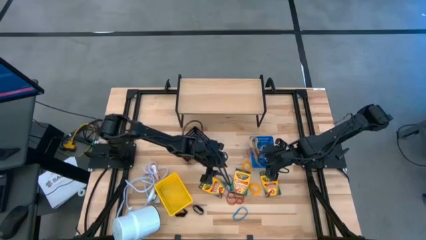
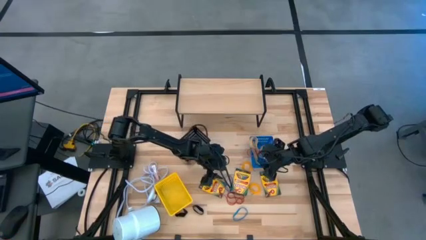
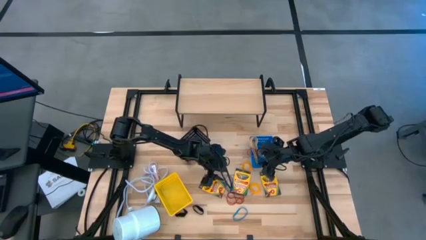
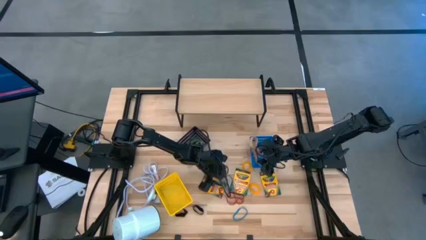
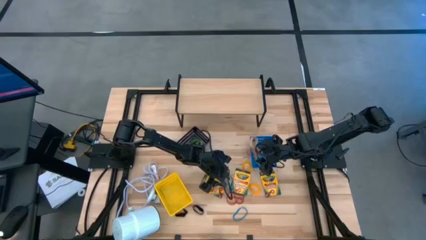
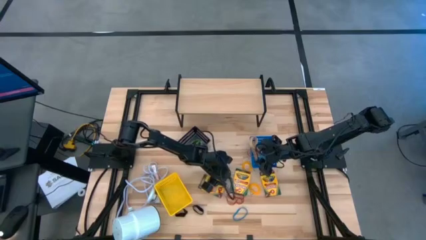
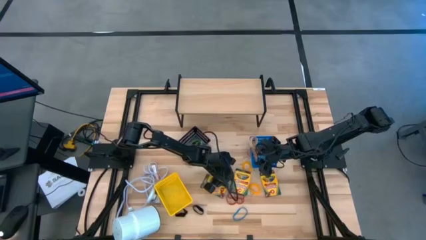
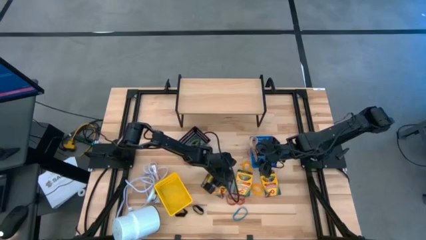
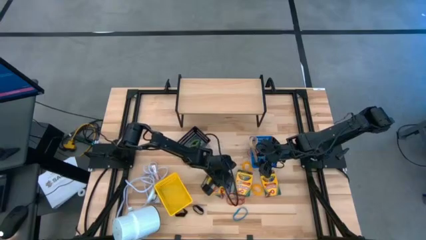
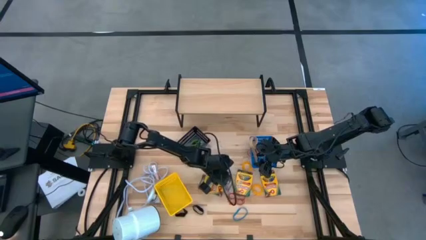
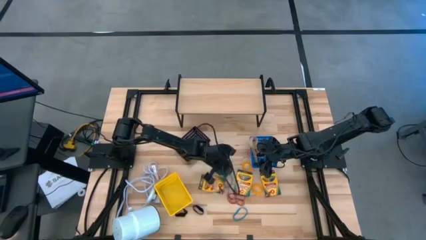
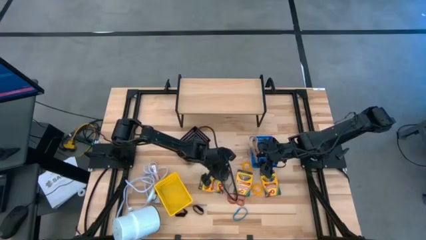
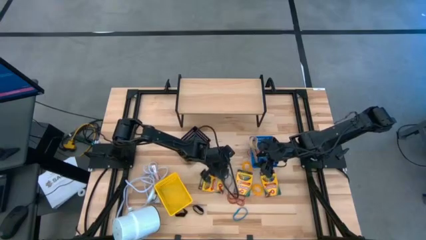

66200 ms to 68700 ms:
Task: Pick & Place Office Desk Supplies
Put the blue rubber band into the blue bin

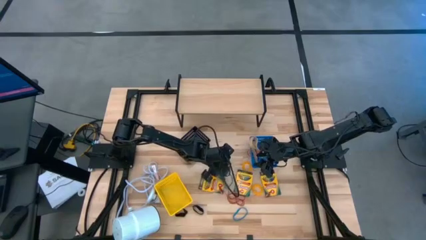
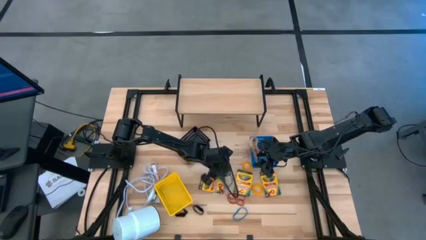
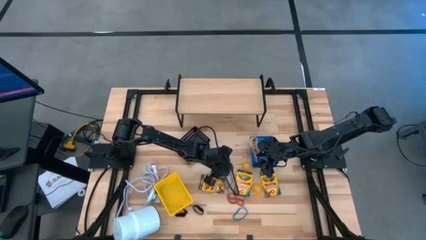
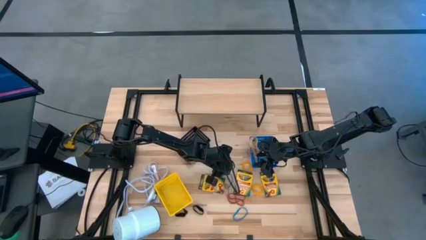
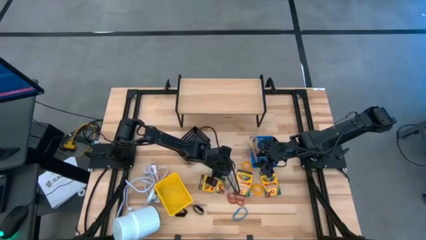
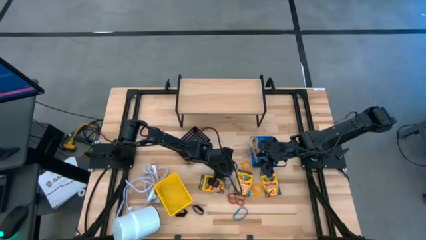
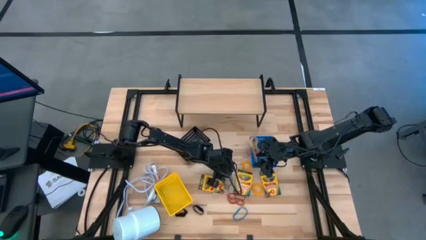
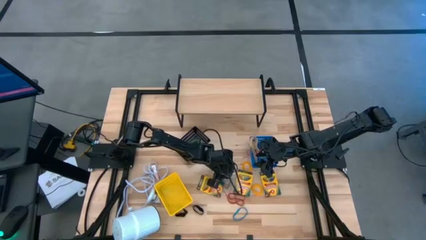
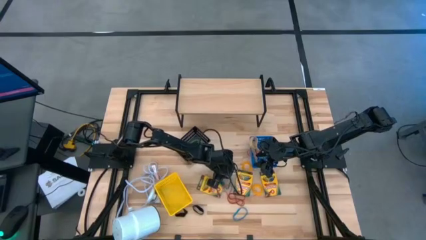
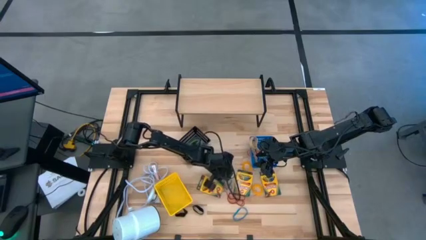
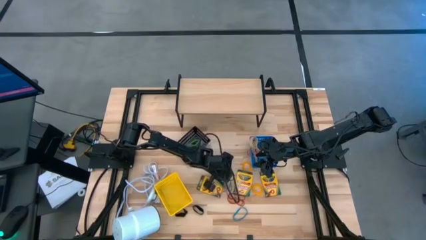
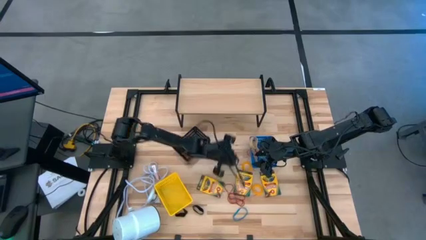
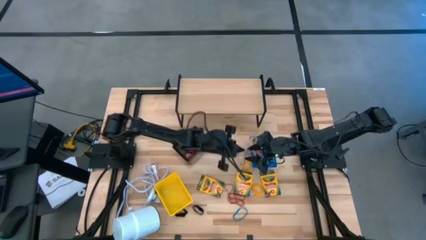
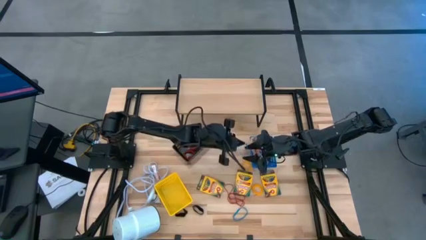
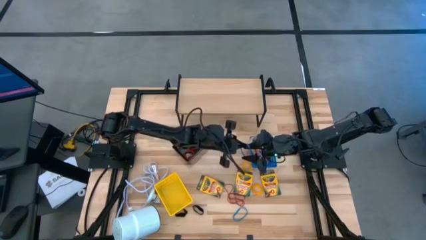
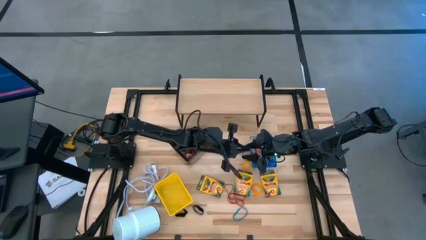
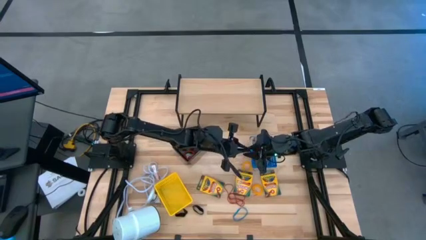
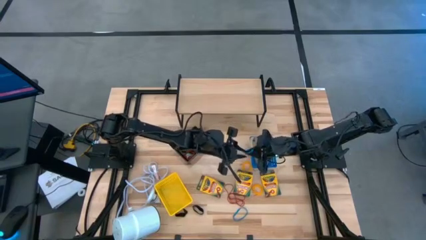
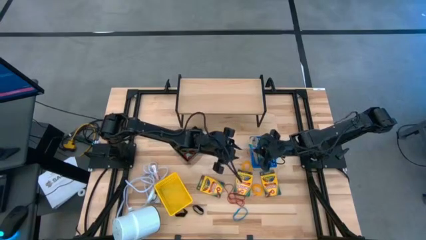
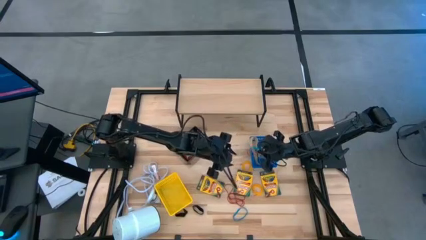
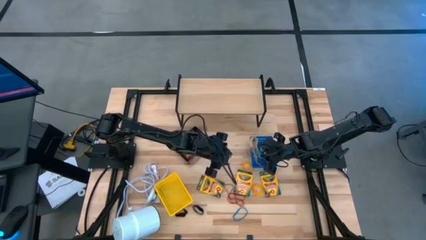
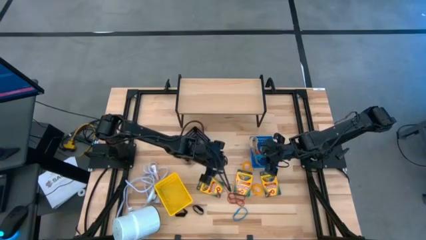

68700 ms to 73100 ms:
Put the blue rubber band into the blue bin

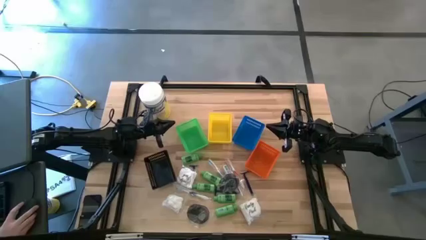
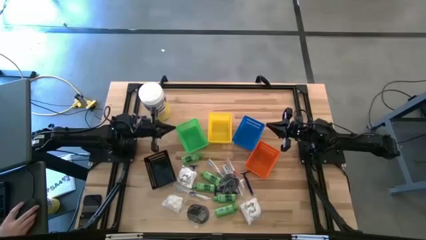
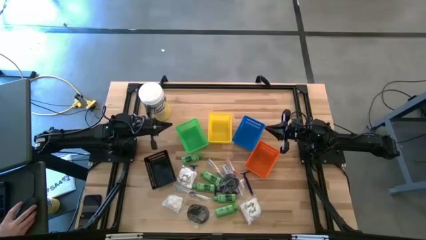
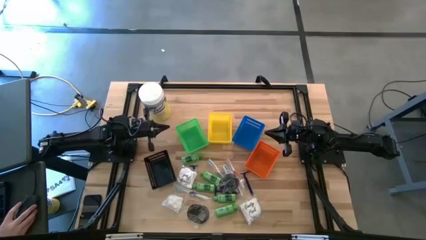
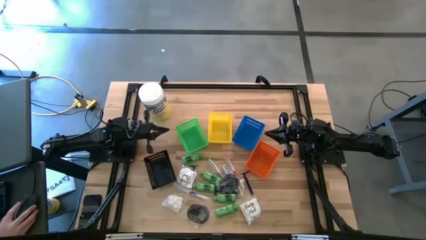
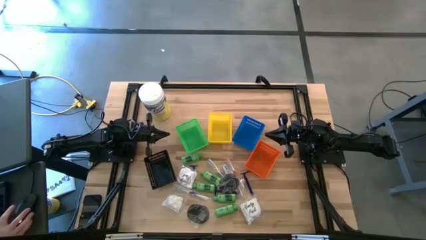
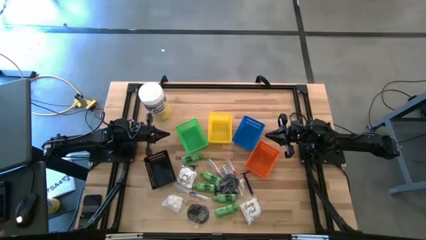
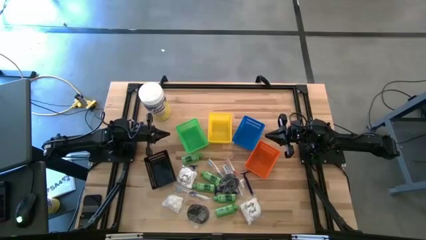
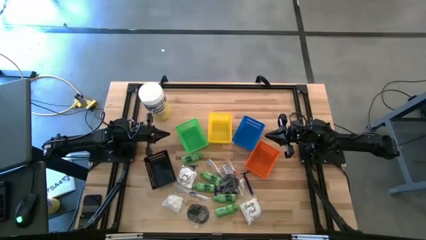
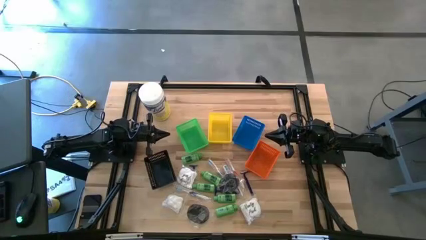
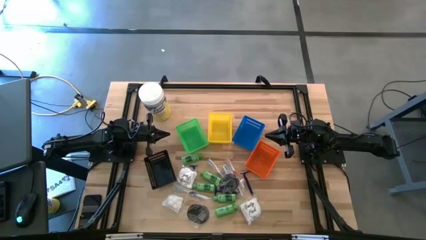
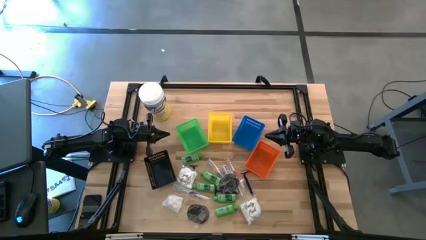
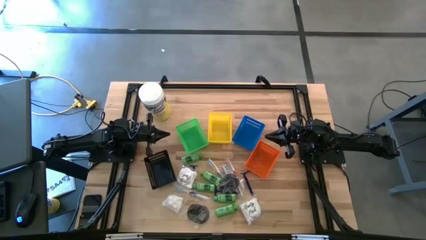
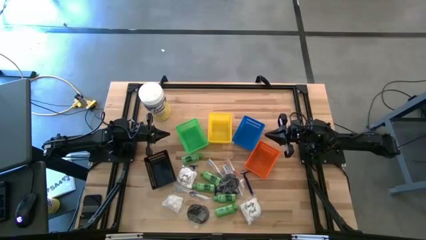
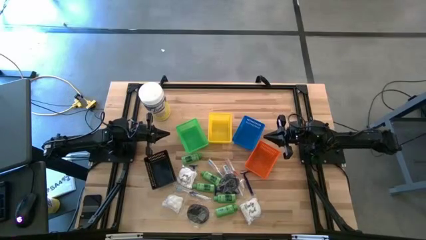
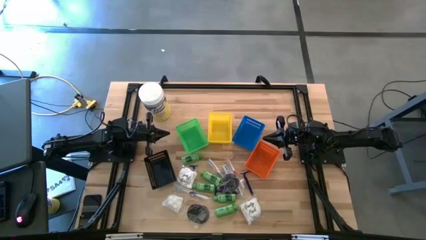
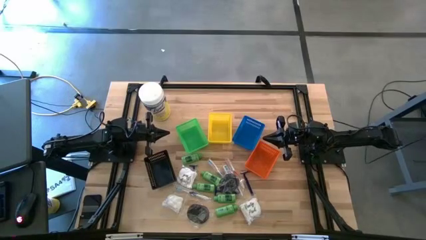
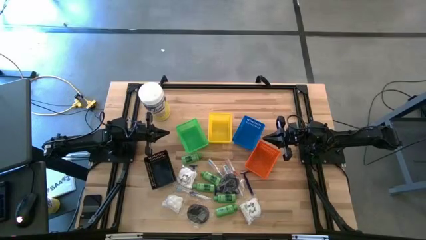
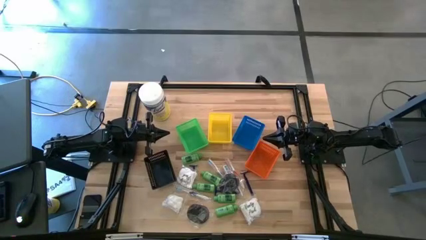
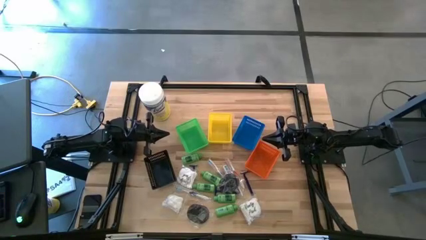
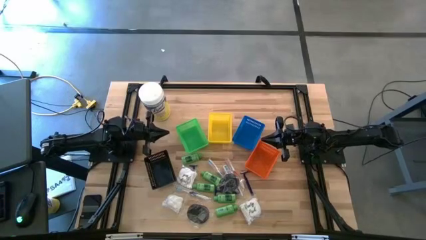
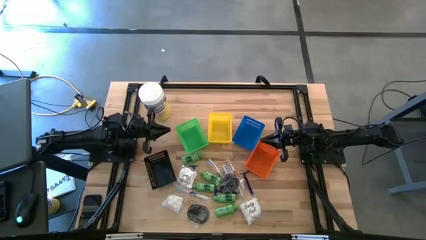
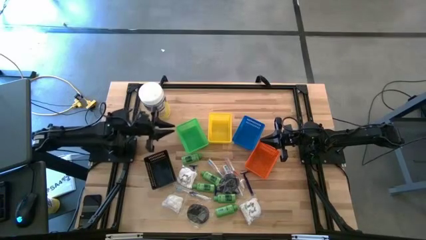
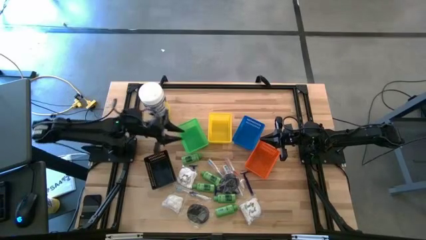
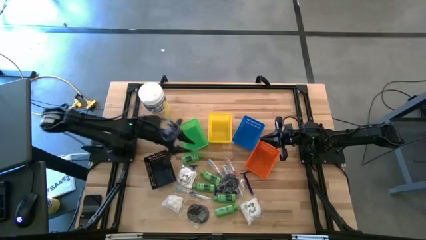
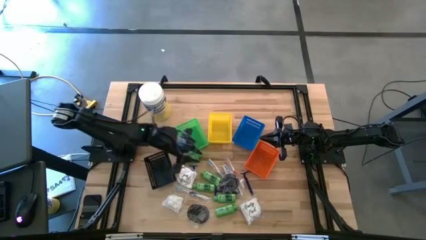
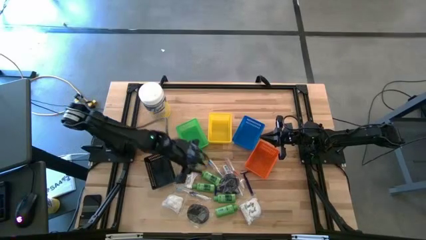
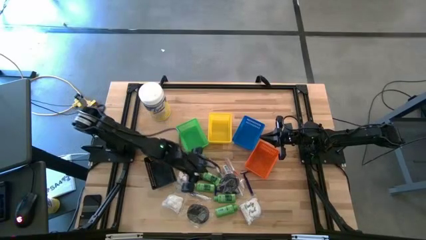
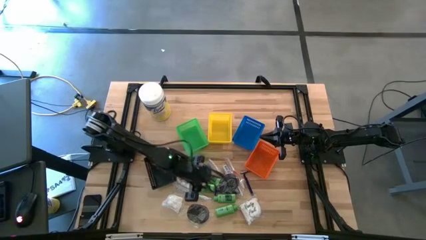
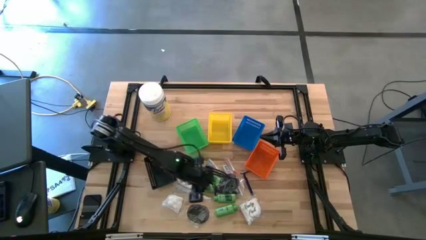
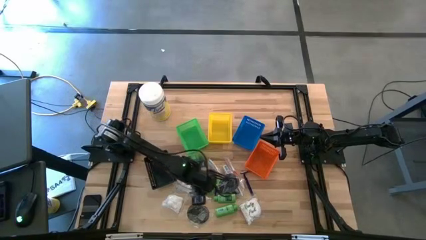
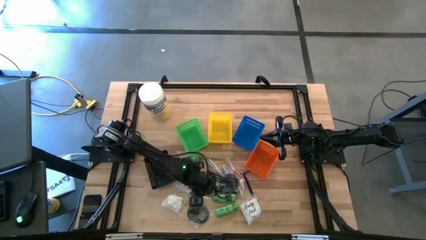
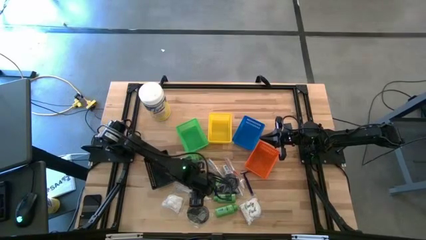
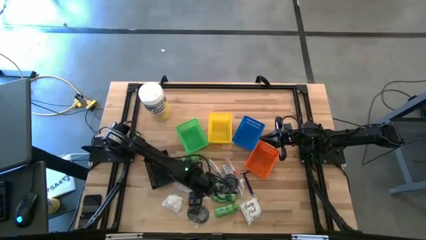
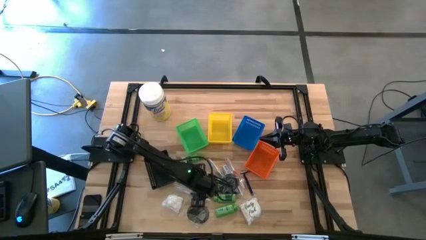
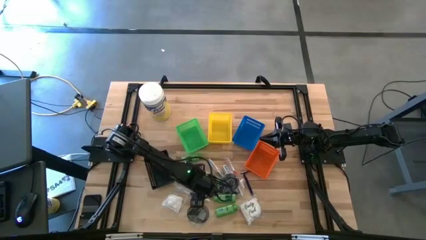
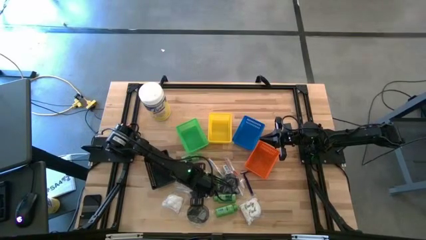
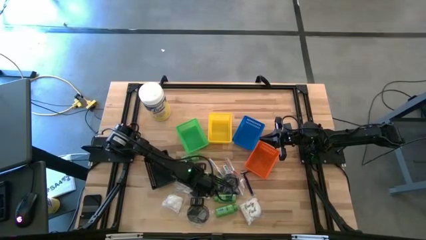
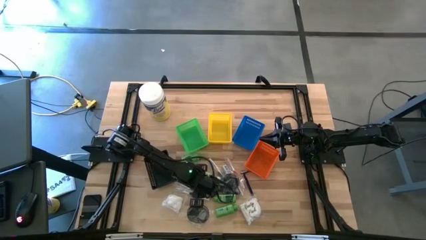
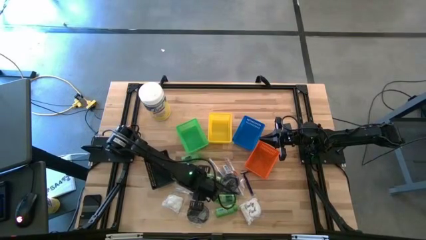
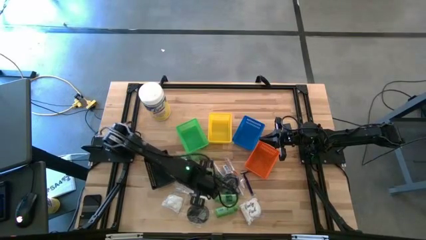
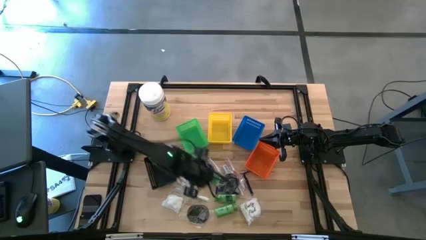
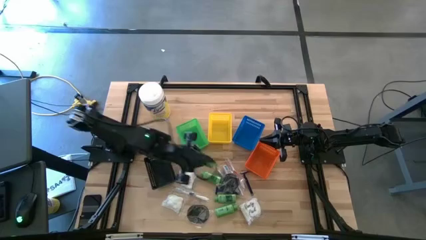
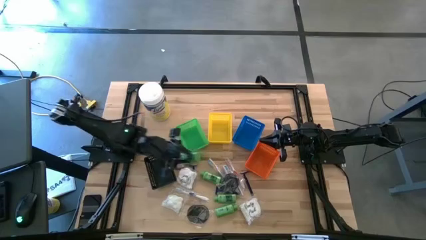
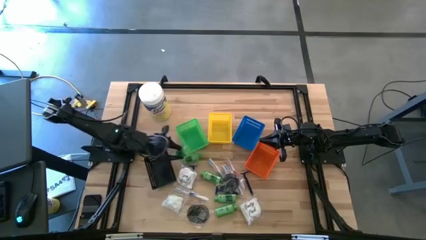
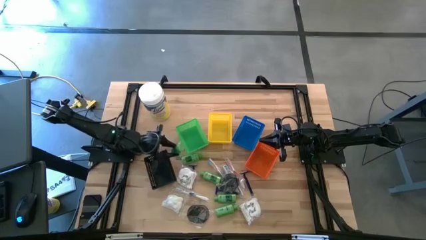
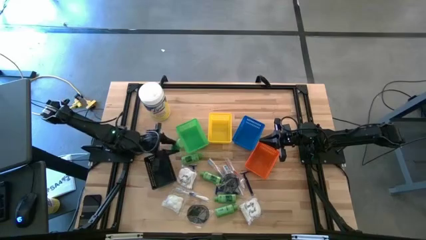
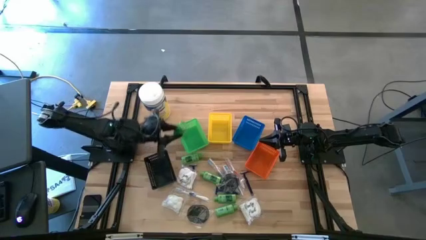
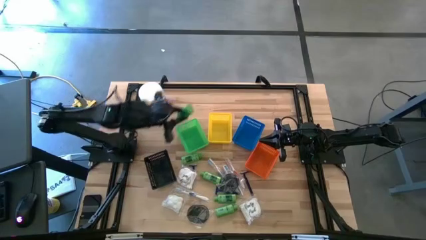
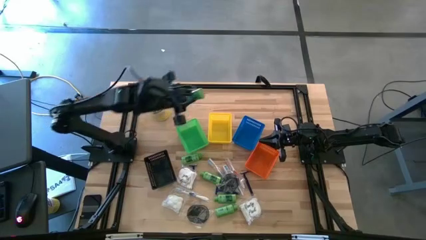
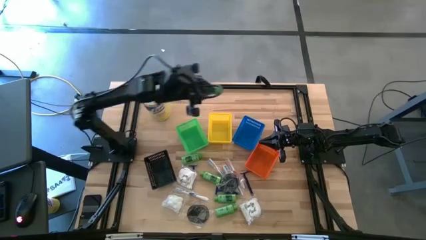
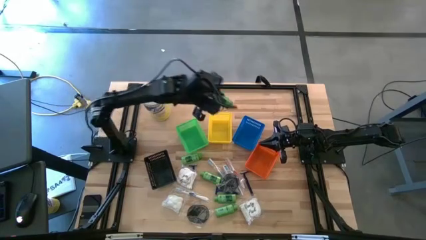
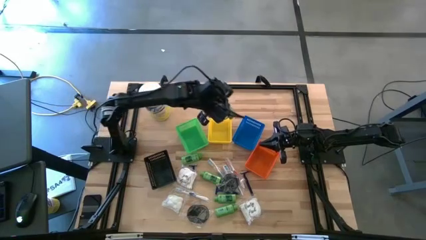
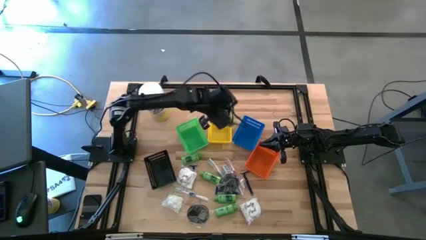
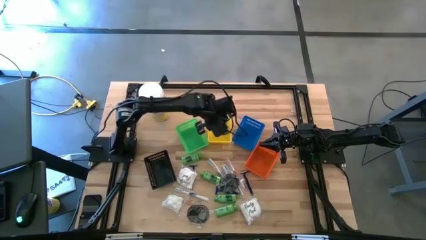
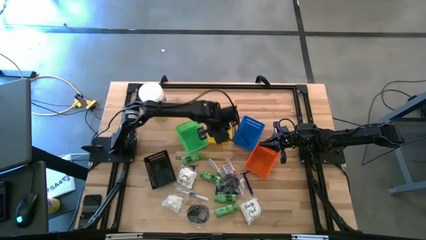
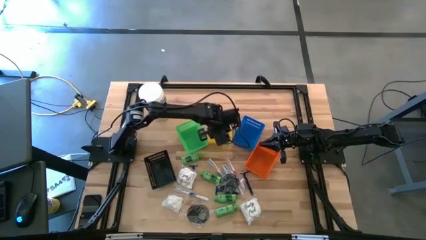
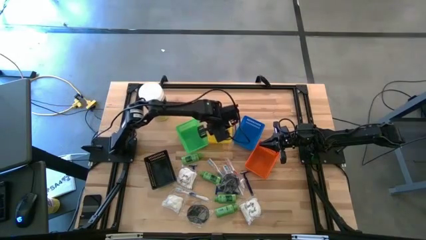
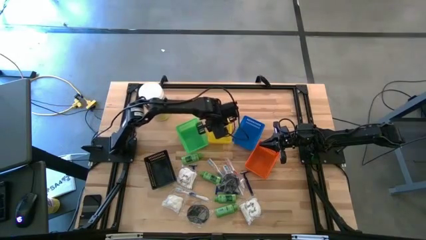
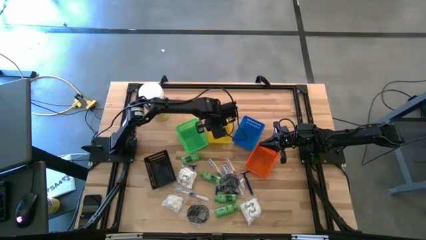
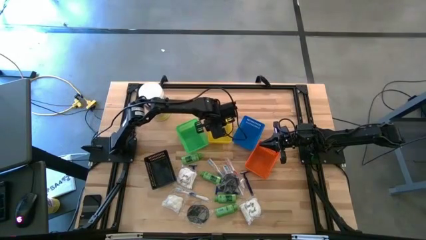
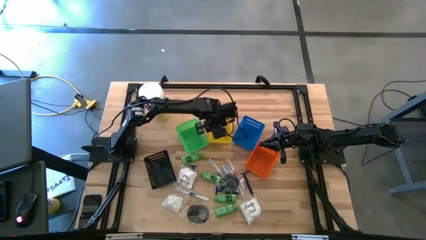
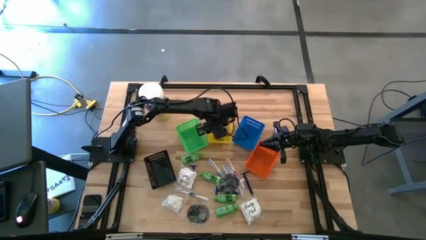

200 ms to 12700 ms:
Task: Pick & Place Travel size toiletries
Put the shampoo bottle into the yellow bin
